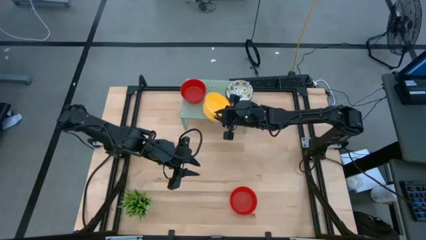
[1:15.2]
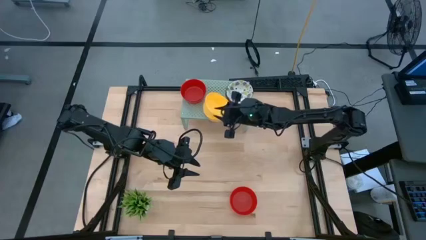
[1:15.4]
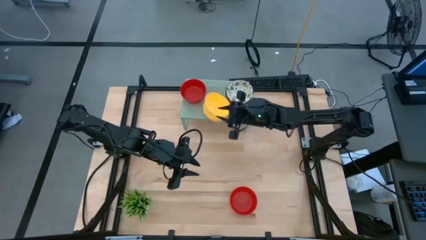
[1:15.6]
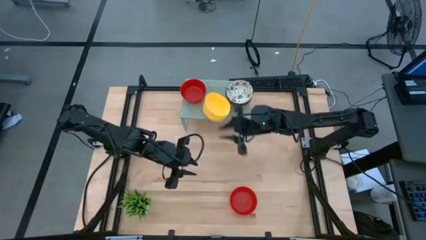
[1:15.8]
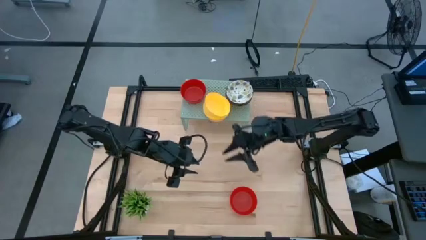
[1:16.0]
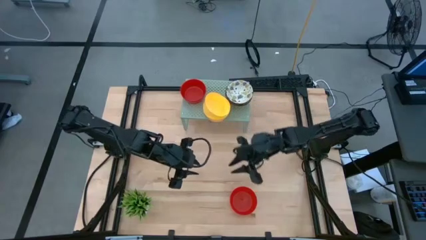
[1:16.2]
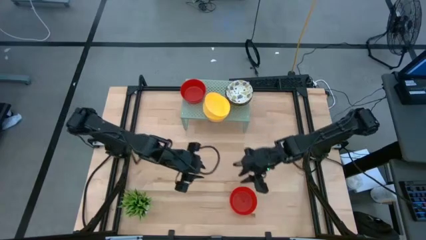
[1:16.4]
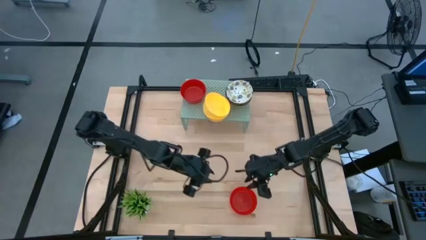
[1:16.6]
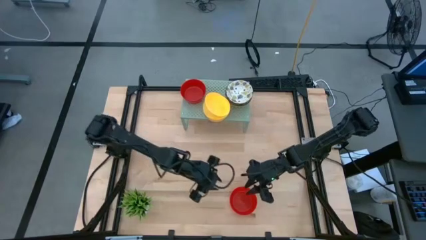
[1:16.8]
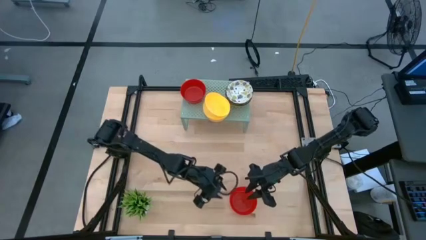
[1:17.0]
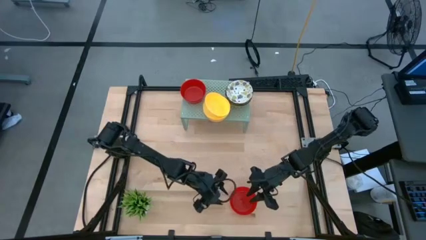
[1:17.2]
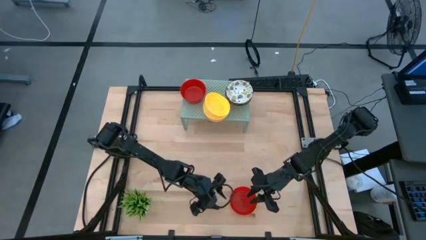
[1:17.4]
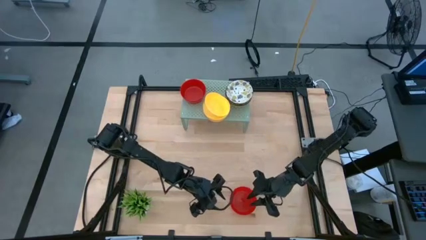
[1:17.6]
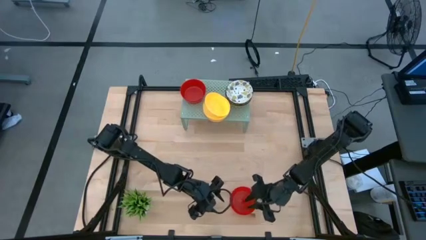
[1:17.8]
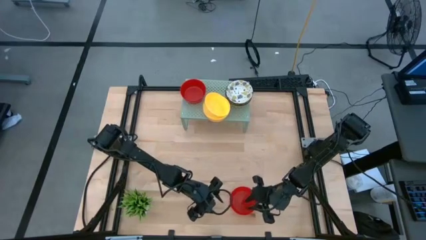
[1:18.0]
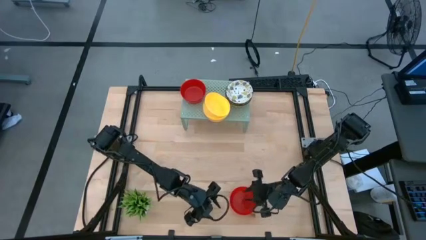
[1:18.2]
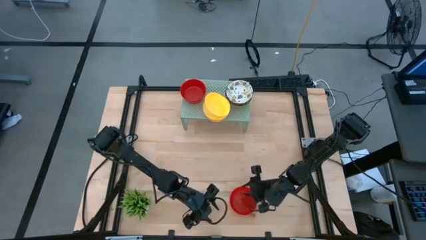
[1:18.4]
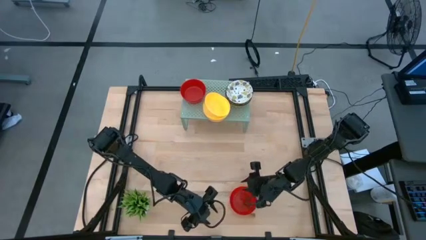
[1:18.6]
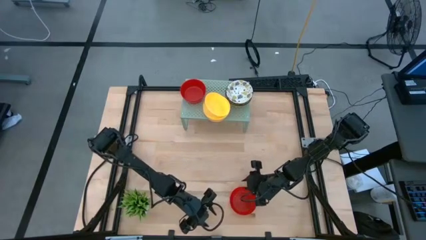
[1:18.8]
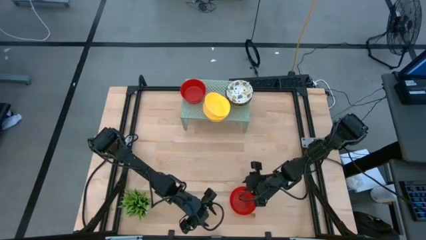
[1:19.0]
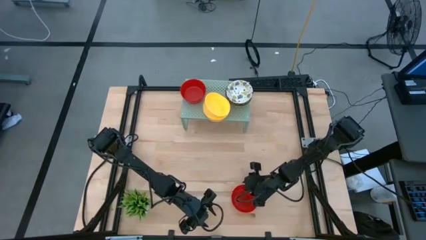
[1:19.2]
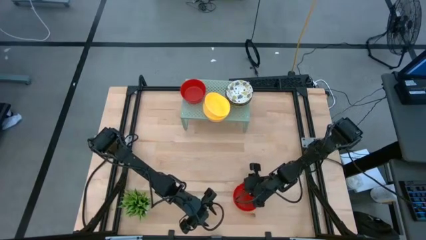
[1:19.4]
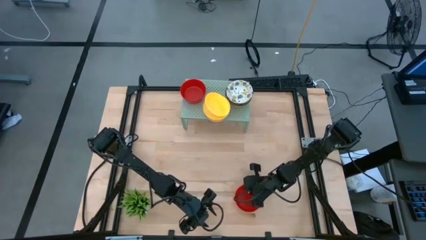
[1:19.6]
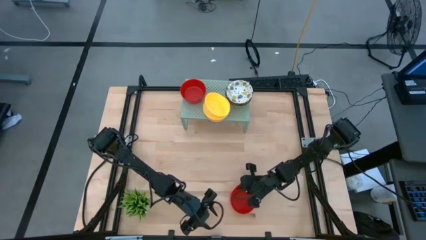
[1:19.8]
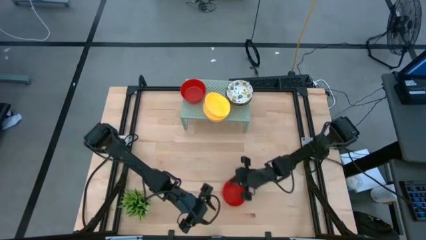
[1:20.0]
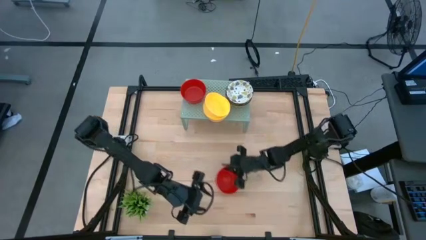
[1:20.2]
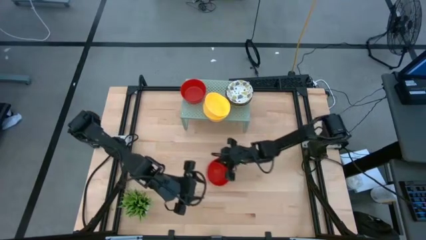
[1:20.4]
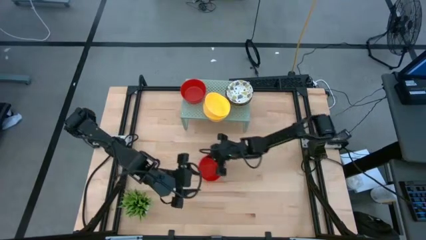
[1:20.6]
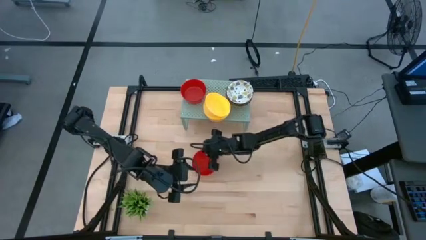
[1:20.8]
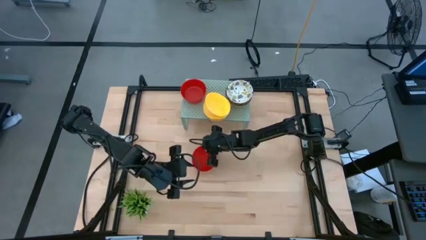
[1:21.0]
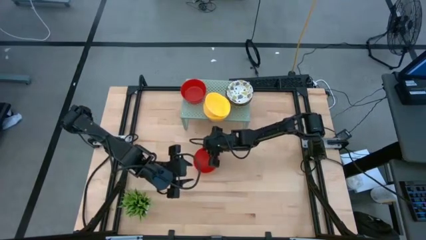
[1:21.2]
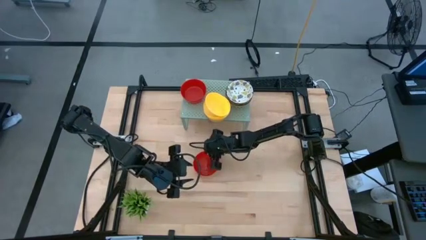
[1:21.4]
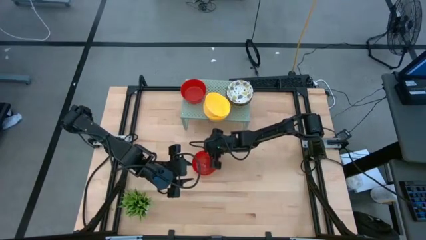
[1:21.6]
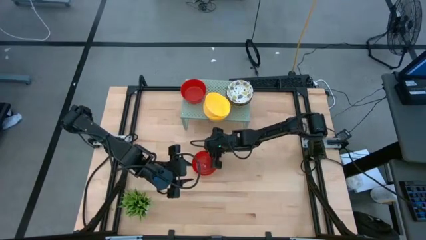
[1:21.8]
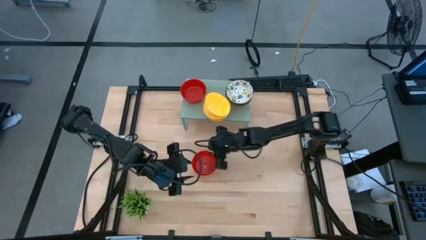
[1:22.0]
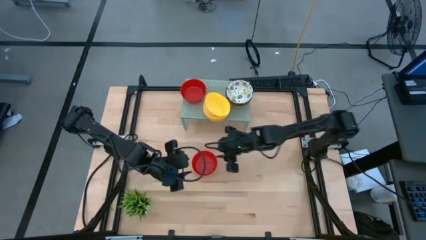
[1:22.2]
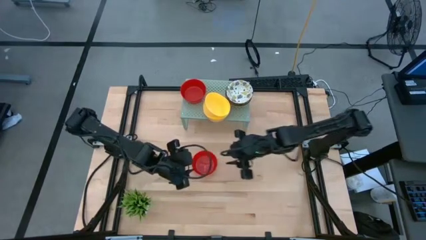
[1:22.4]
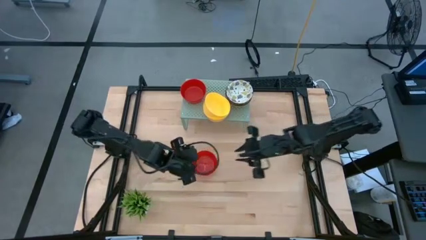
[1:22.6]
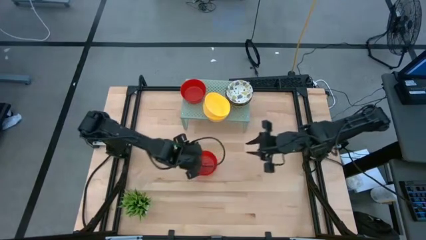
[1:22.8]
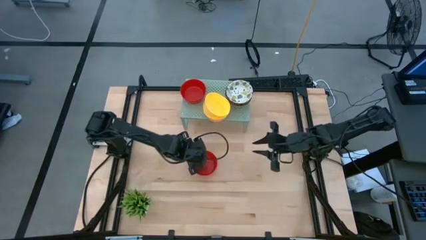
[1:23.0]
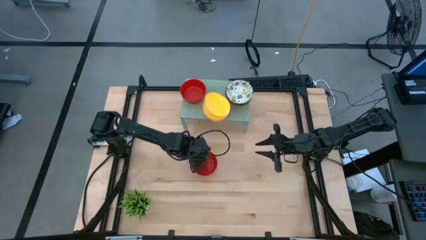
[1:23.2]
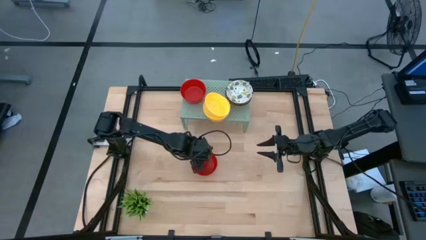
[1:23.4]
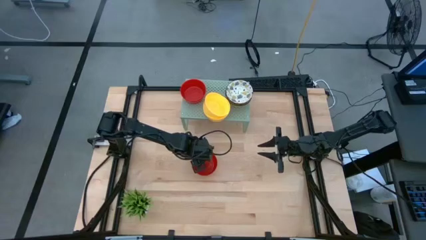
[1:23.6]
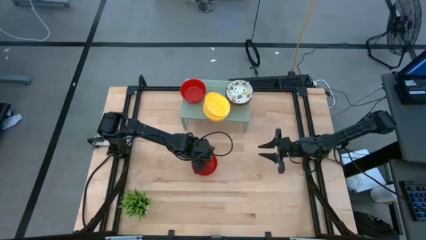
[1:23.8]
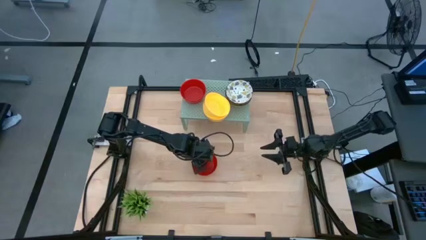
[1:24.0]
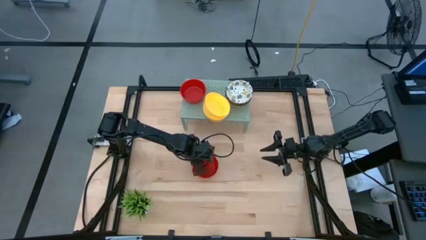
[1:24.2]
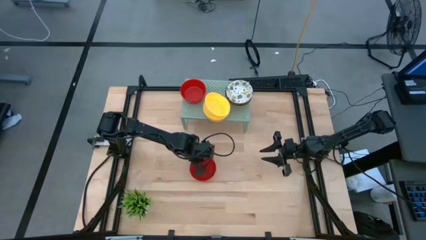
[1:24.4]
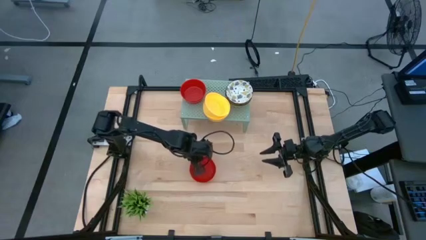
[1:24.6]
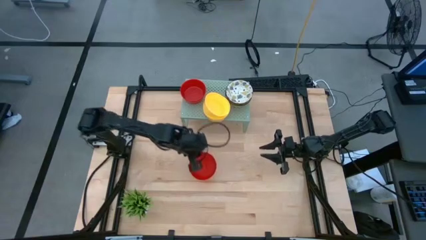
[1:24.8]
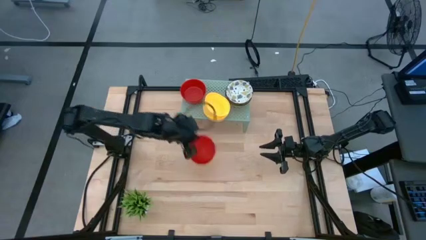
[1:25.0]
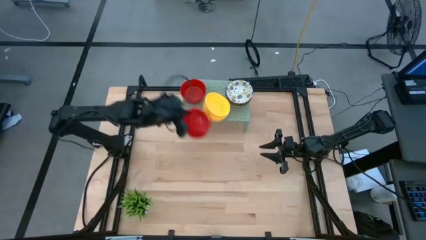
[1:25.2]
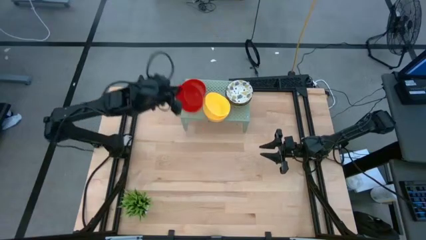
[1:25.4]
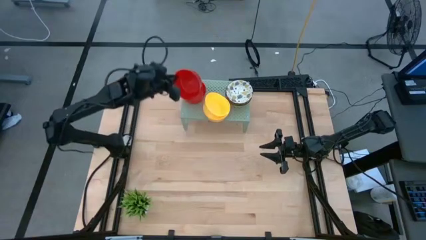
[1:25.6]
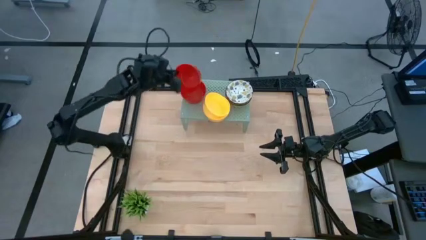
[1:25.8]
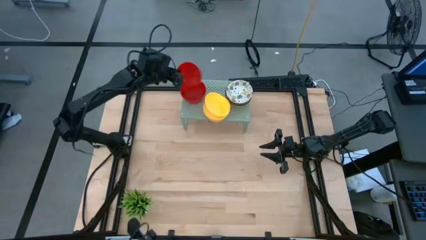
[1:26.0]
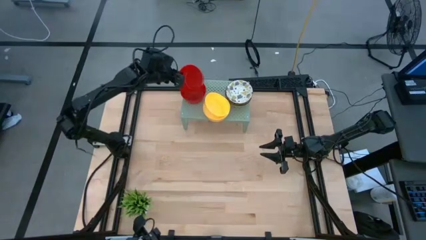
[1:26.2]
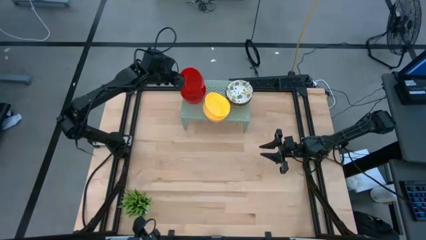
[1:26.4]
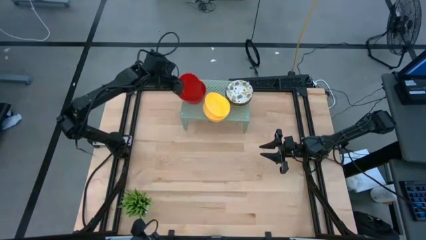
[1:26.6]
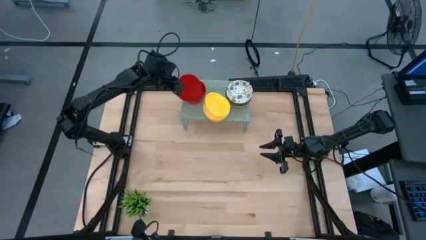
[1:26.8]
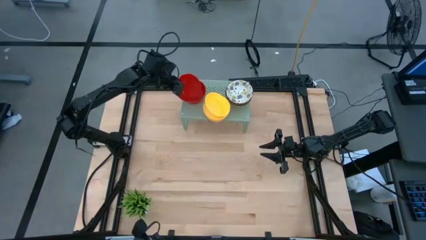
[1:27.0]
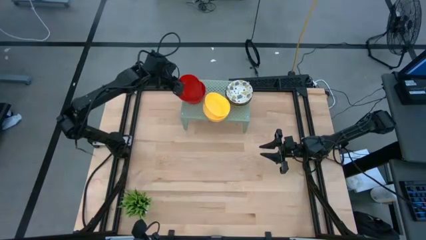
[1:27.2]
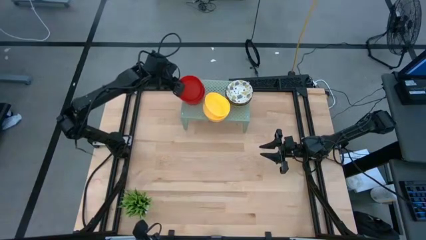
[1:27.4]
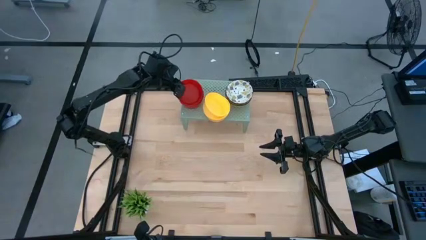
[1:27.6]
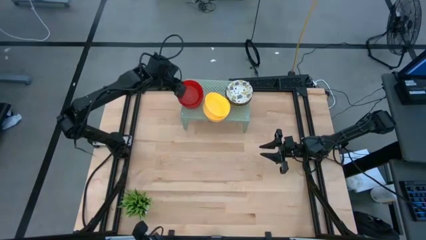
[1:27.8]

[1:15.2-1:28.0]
Task: Pick & Place Mini bowls
Stack the red bowl on the red bowl on the shelf

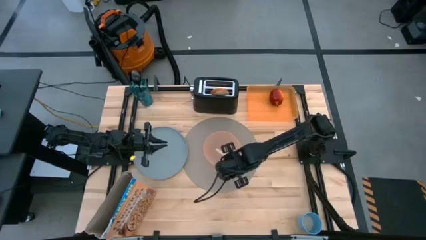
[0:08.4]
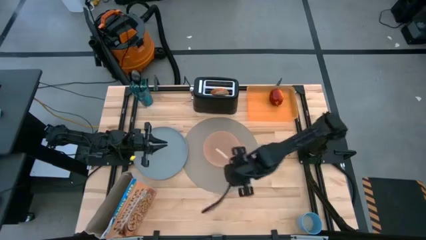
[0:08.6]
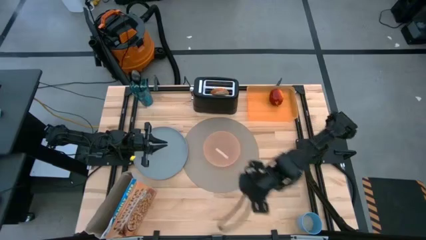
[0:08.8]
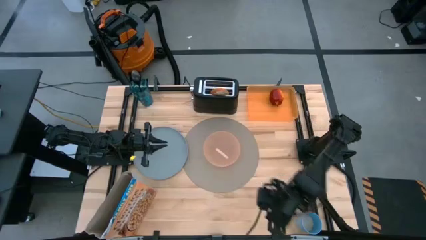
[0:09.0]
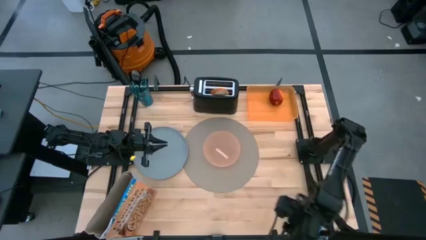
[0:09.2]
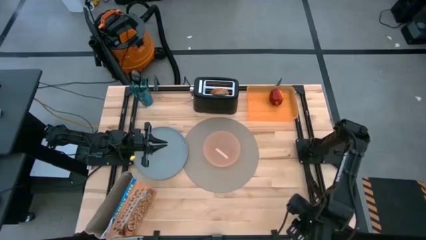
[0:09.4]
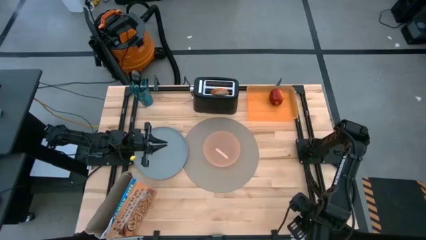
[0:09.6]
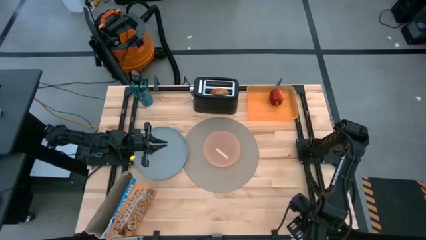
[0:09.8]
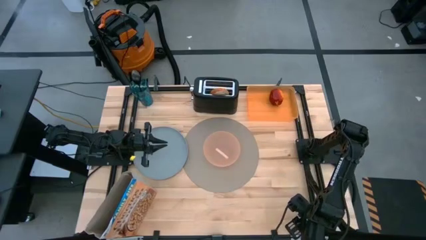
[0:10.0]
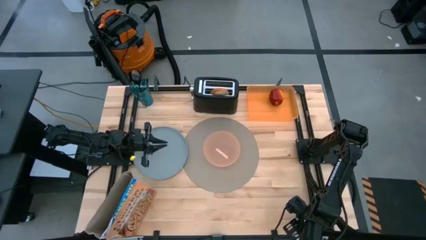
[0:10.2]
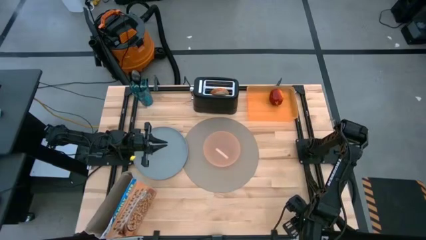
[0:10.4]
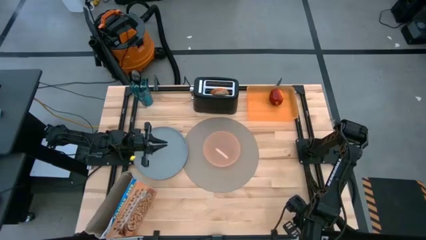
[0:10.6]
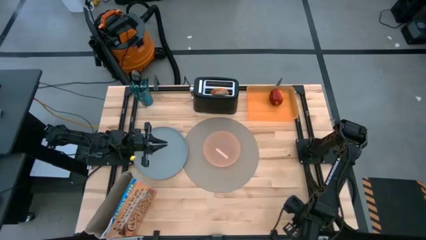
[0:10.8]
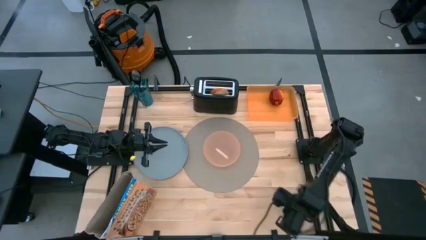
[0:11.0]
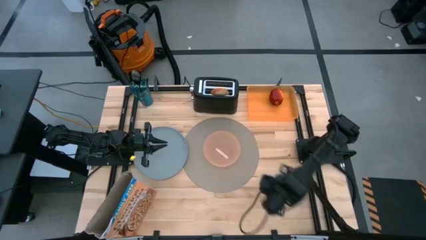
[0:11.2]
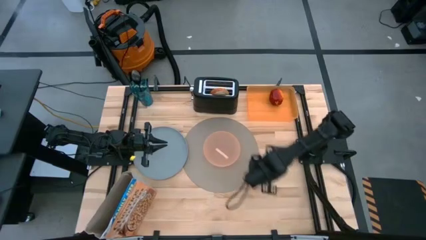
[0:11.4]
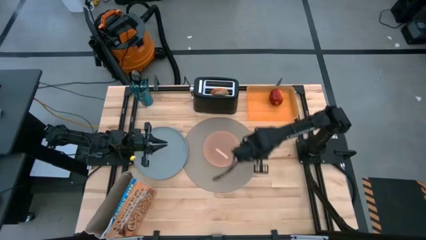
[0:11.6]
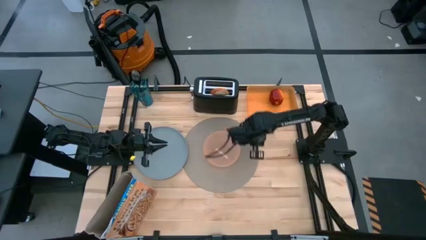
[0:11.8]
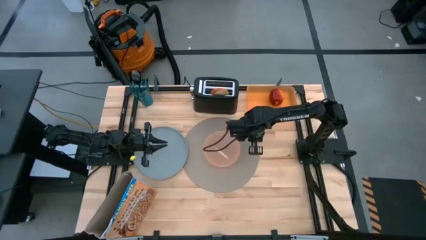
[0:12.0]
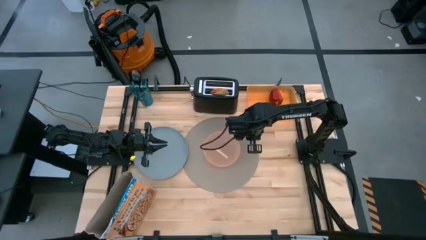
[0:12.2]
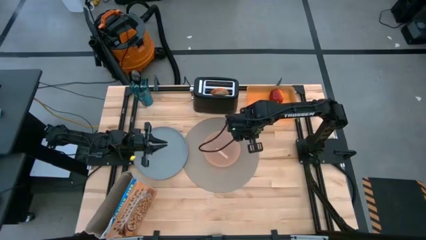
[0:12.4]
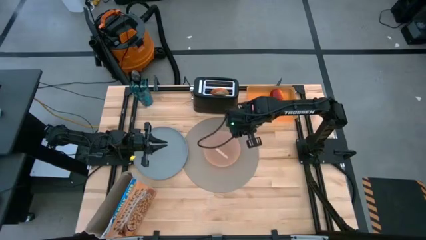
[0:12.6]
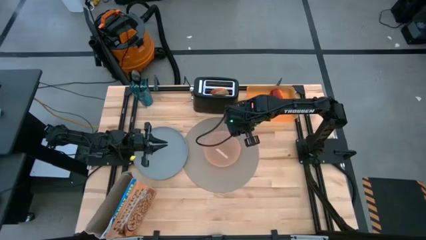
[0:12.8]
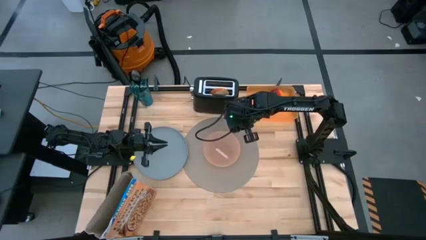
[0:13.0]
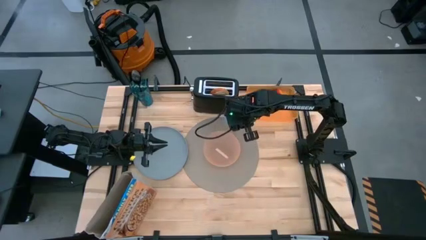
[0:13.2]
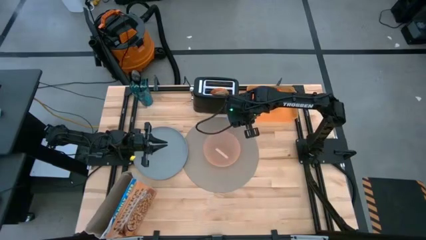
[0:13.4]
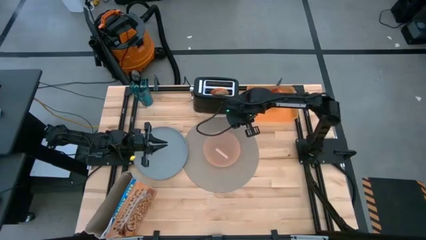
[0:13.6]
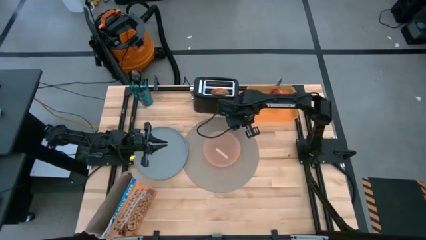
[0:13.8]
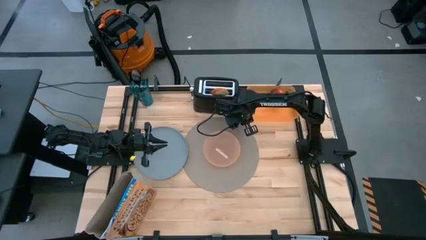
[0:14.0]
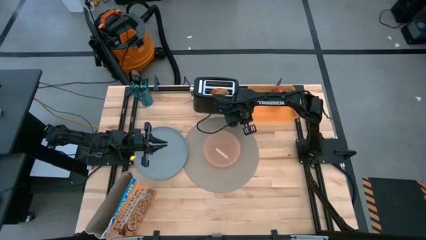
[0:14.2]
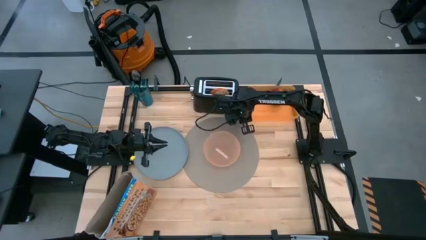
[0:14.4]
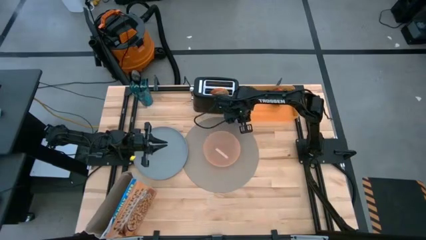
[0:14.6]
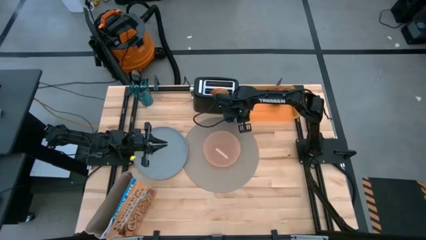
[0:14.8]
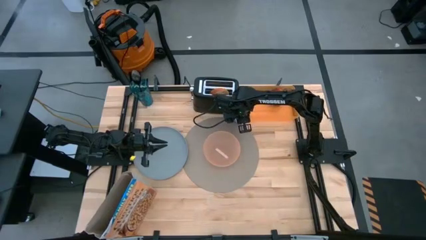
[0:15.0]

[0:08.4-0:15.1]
Task: Arrange a breakfast setting
Put the blue cup to the top right of the gray placemat
